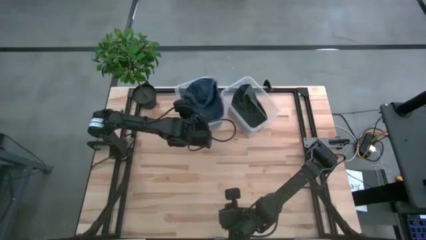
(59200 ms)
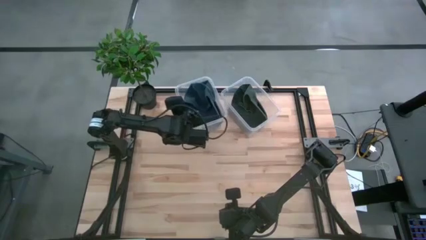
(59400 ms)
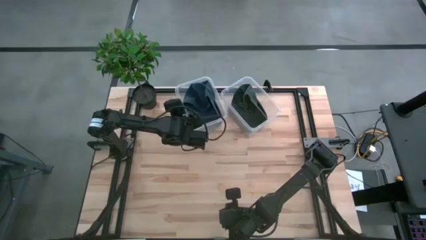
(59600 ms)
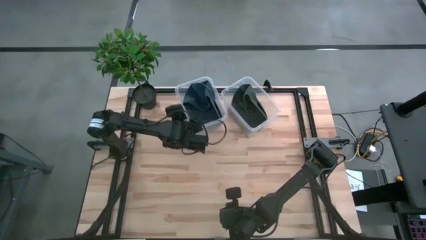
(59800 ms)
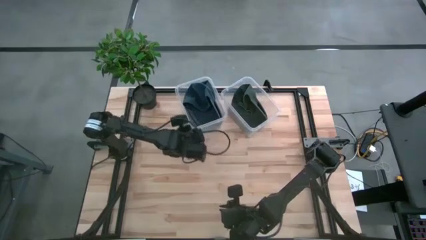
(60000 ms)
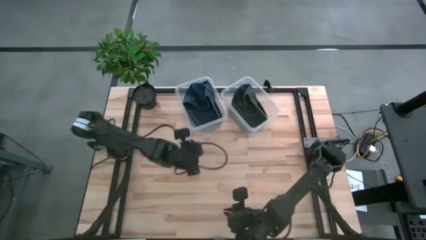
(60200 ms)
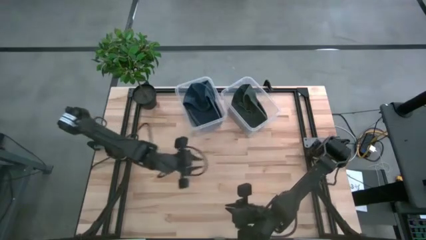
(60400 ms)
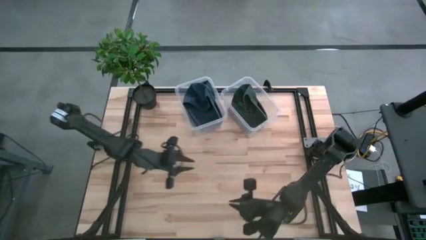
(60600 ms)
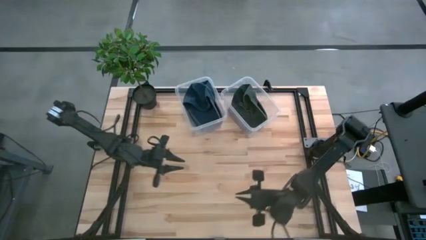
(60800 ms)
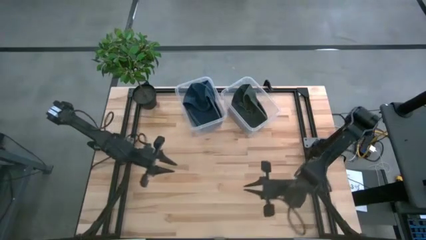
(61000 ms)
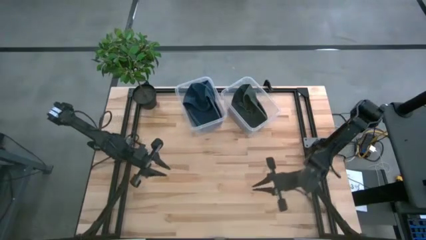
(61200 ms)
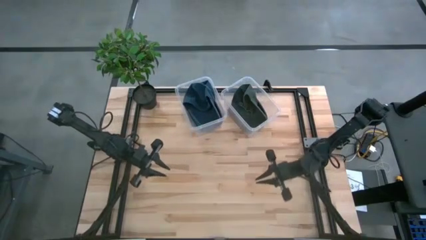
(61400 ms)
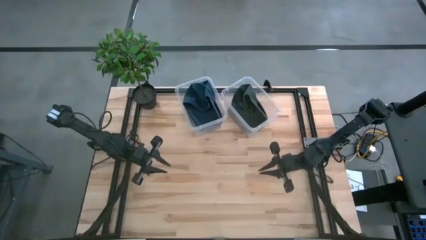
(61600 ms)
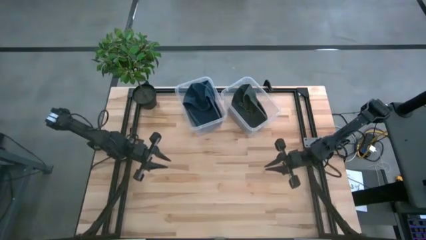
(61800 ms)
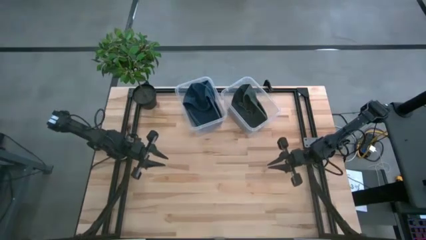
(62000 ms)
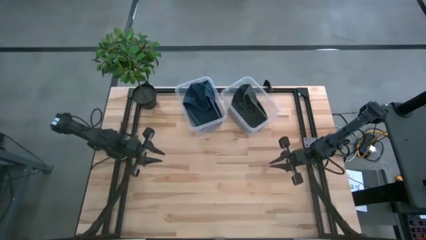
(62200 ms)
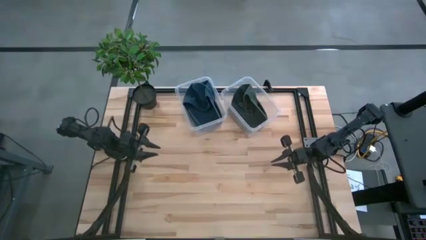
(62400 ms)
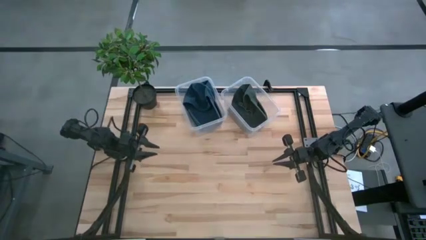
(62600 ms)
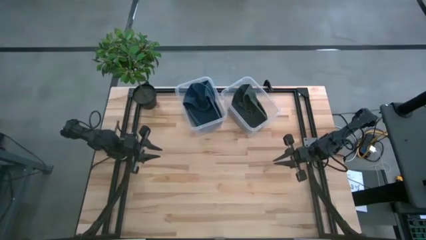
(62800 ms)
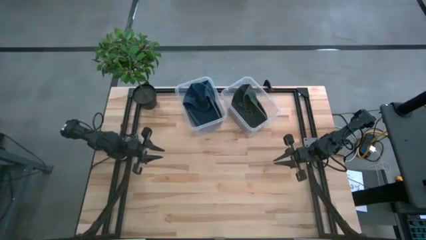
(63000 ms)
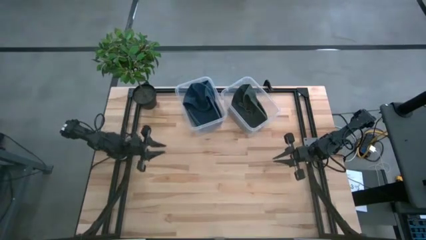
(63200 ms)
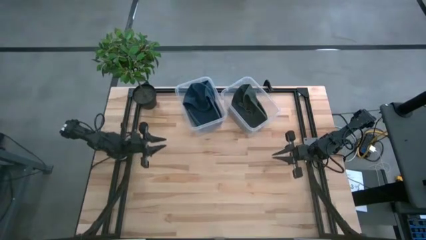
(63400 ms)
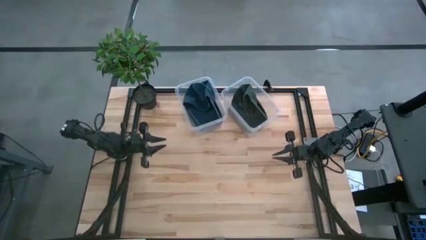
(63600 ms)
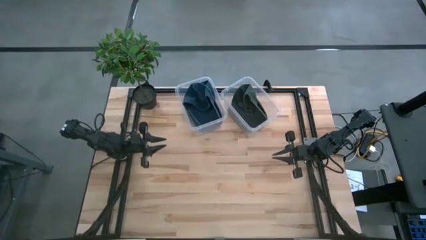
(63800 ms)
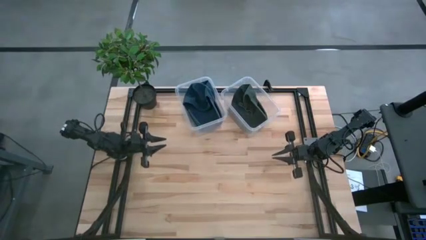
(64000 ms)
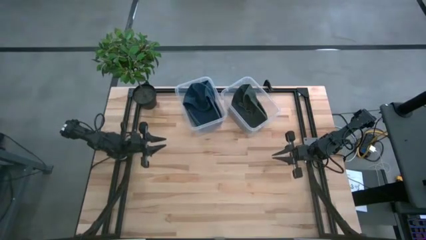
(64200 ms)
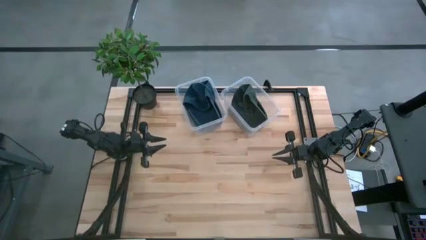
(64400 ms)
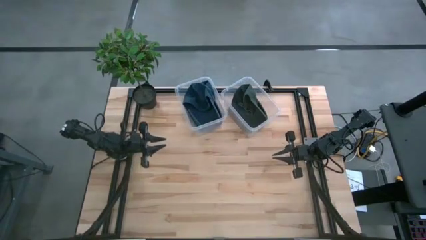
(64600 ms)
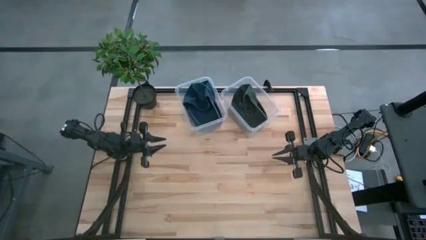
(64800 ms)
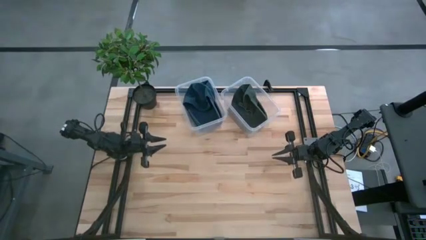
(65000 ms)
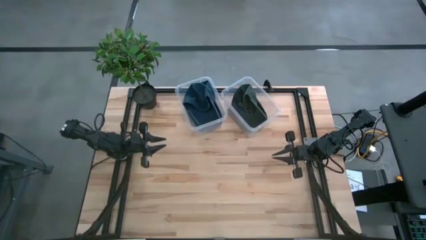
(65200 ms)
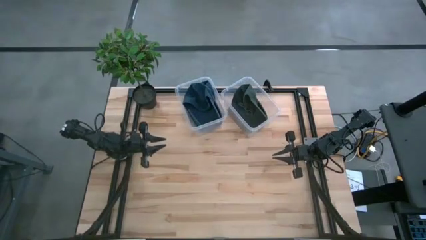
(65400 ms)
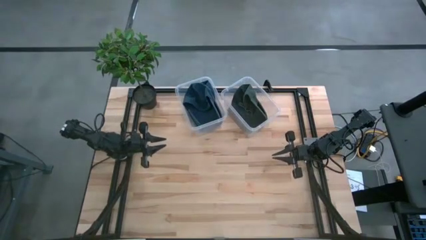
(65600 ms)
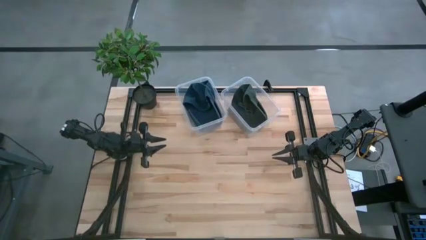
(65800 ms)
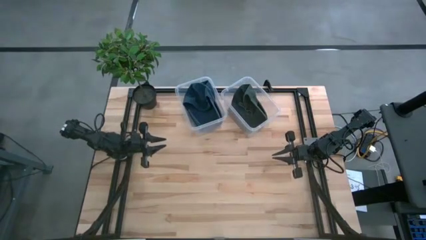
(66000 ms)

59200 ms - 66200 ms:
Task: Pick & Place hat
Return to Home Position

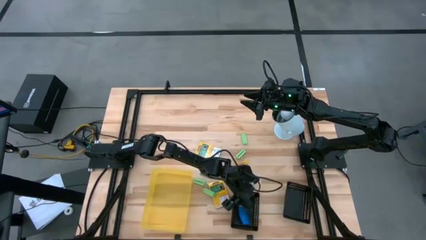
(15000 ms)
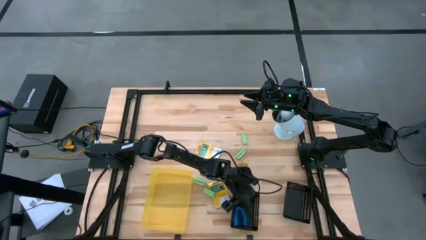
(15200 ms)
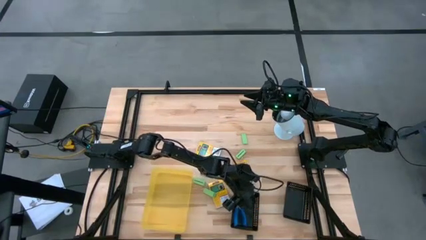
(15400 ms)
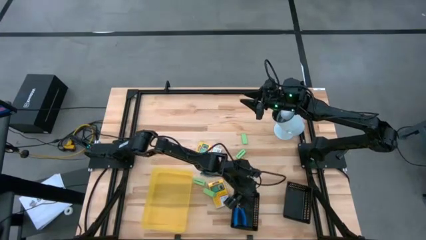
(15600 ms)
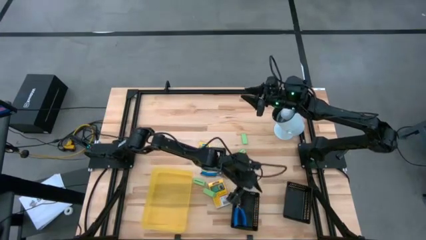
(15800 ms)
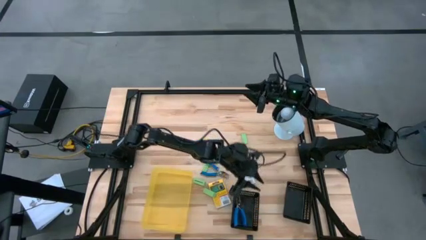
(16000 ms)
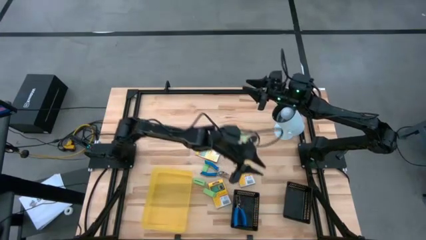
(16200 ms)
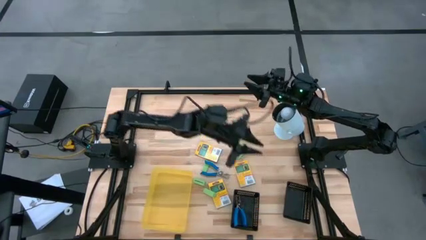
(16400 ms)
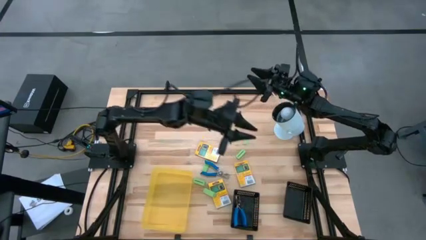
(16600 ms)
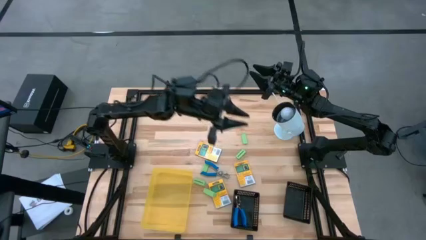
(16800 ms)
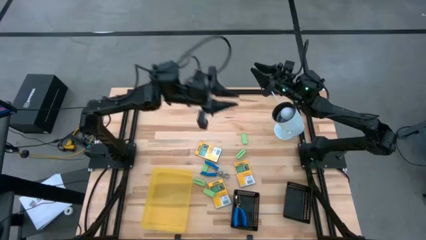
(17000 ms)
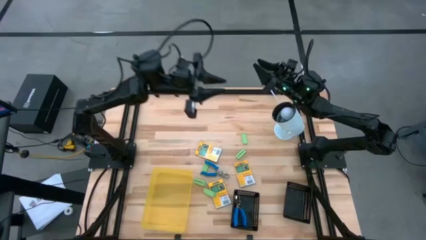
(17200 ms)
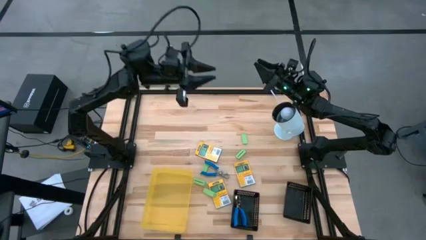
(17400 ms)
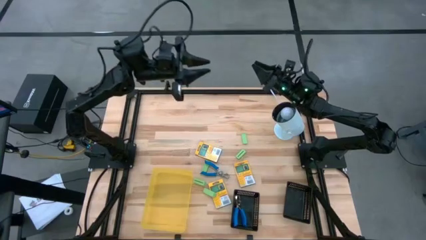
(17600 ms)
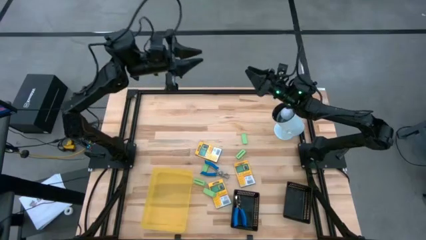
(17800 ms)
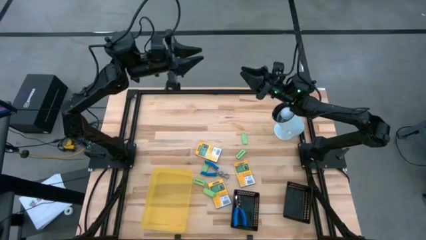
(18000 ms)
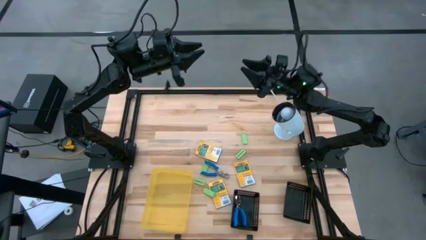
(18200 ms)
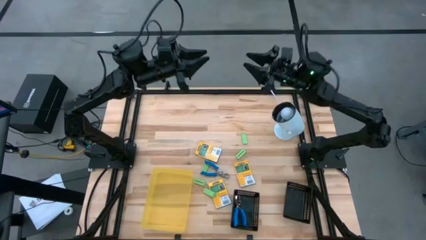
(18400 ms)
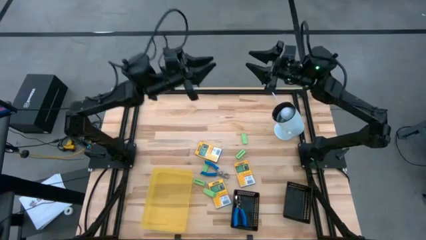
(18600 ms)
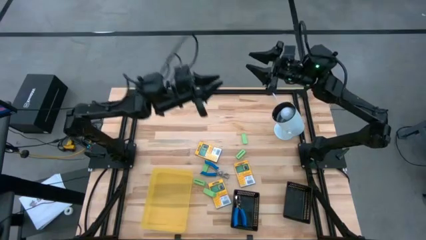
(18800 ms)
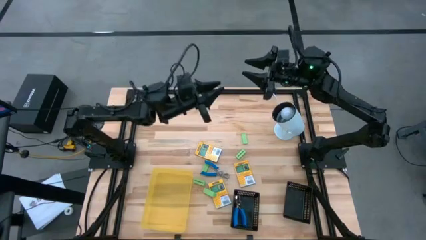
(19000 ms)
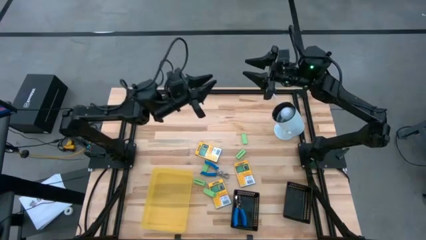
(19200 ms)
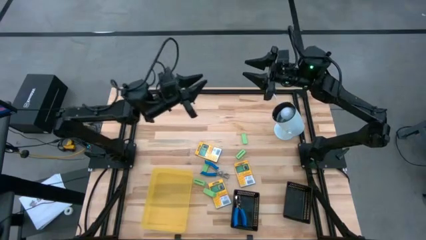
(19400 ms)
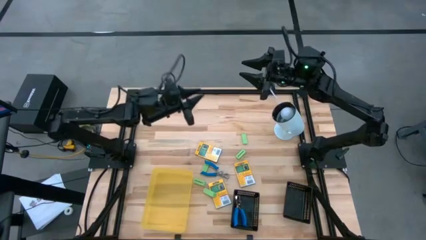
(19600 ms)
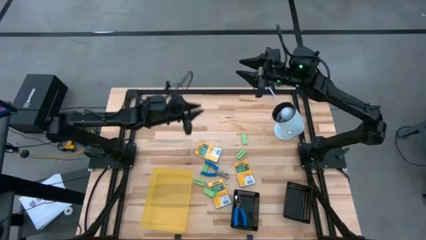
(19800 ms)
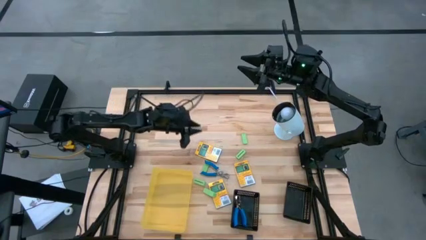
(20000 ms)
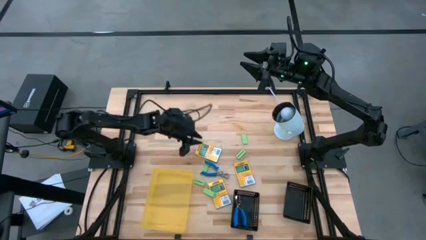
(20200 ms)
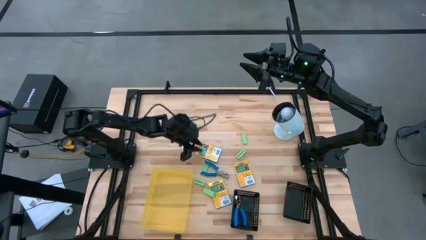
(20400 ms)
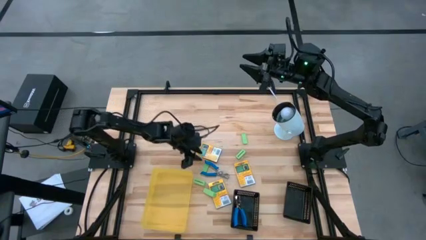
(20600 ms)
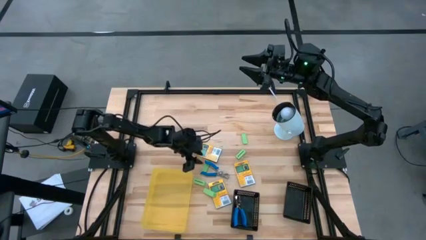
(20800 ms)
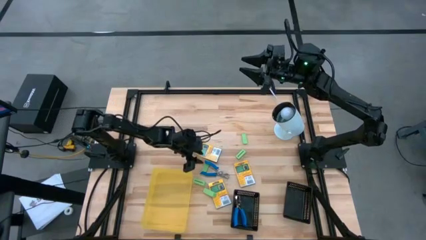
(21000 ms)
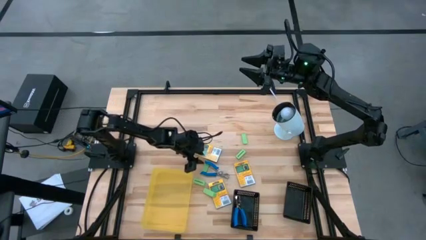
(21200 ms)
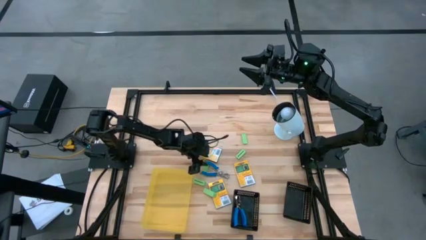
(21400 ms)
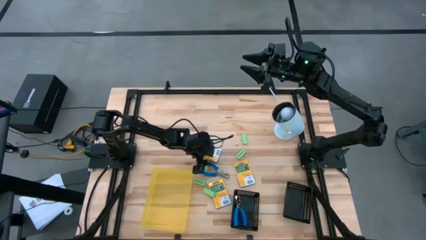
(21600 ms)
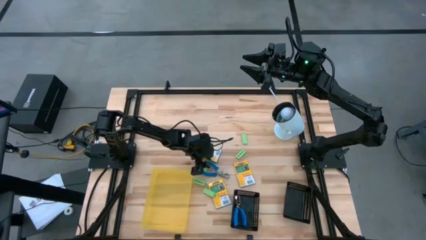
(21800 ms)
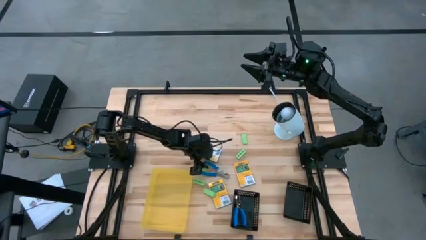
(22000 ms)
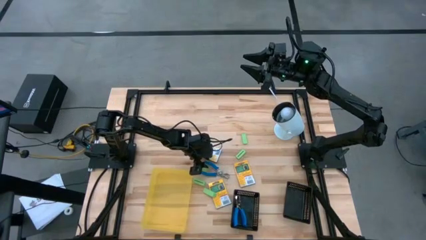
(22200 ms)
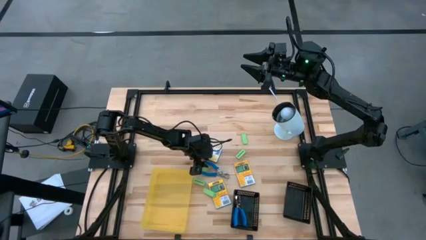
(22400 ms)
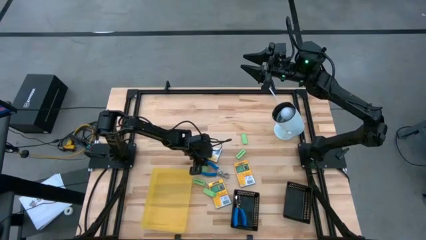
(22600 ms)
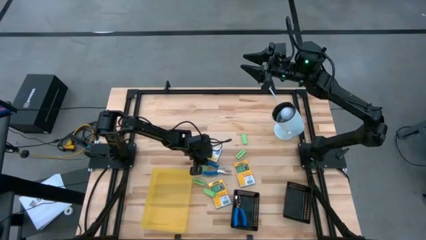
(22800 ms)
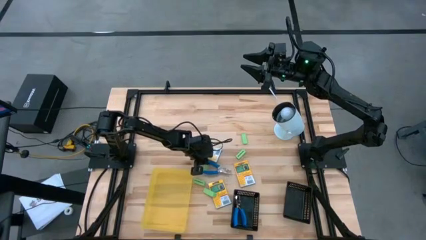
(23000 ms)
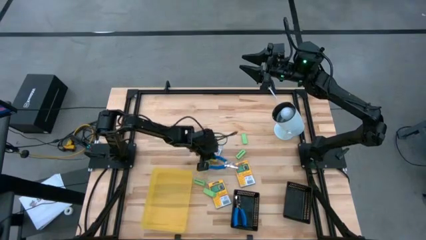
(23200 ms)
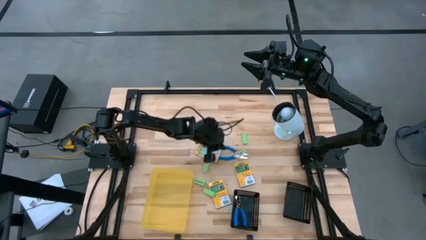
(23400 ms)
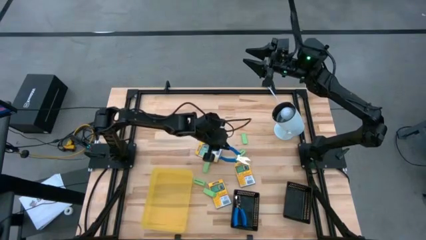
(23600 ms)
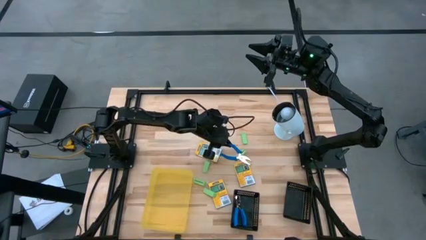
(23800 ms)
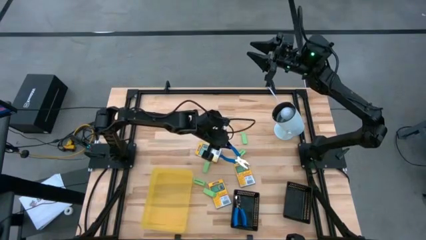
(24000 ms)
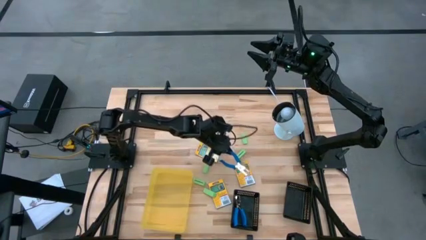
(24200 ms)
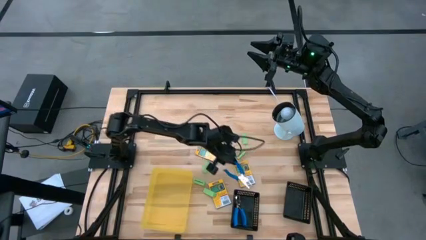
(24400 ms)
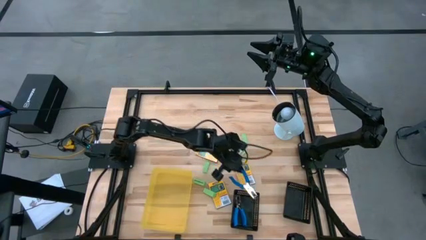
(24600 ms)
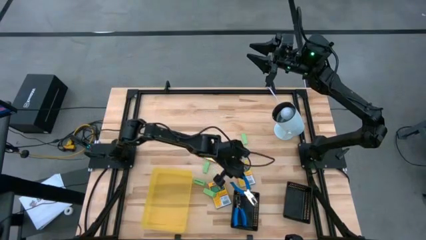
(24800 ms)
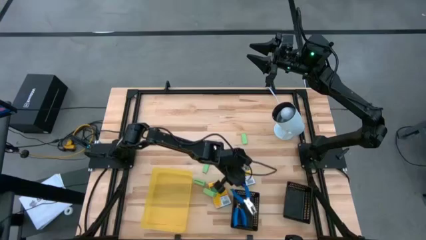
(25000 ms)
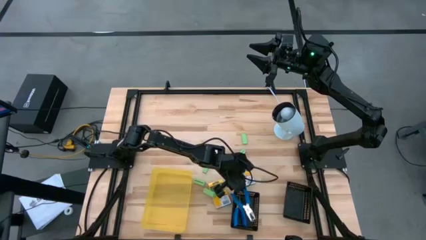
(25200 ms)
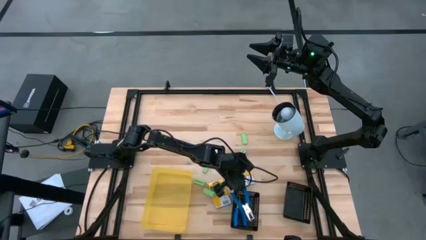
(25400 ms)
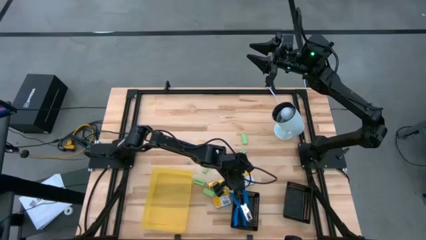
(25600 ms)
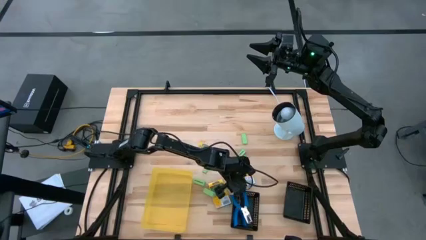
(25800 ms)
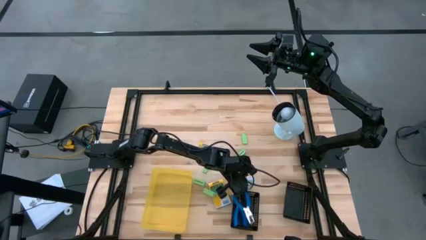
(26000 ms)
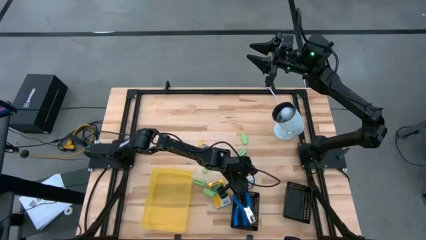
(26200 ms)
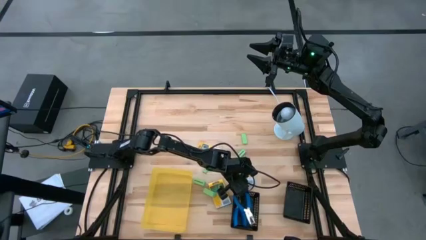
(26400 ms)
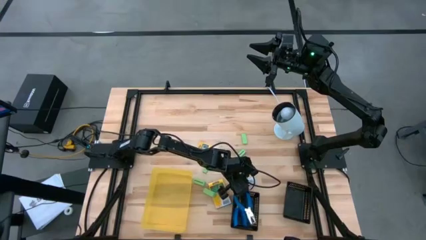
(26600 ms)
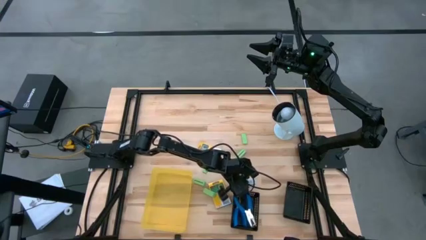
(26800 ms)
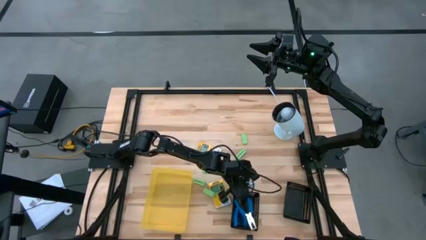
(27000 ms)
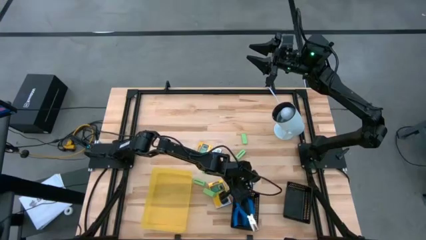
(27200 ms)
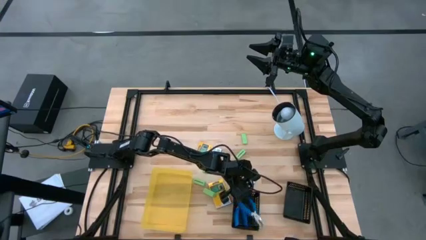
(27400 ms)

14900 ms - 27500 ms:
Task: Pick & Place School Supplies
Put the blue hole puncher into the left black bin
